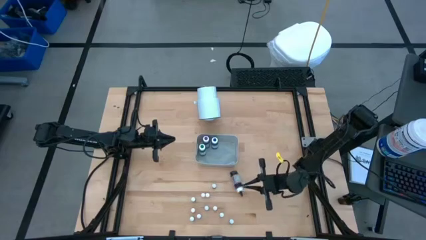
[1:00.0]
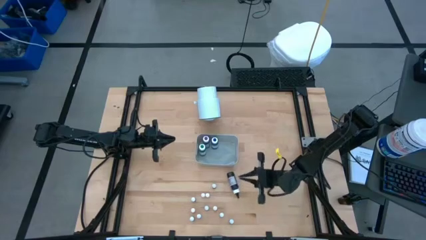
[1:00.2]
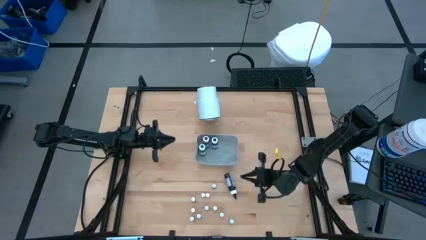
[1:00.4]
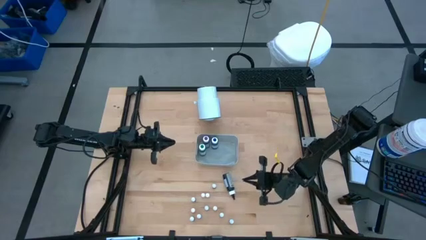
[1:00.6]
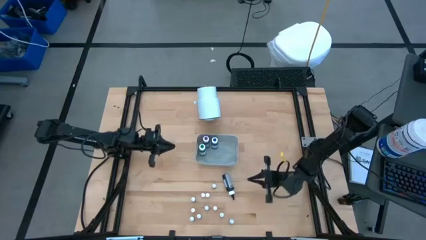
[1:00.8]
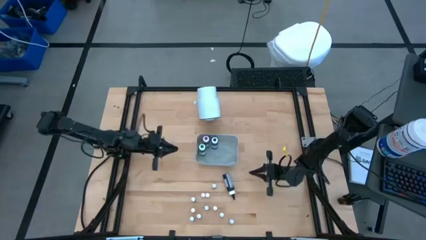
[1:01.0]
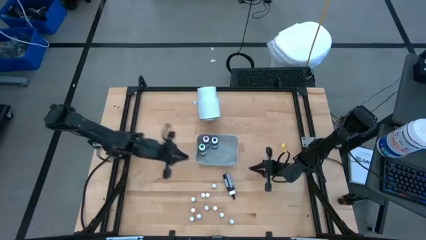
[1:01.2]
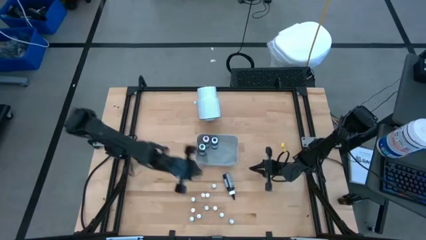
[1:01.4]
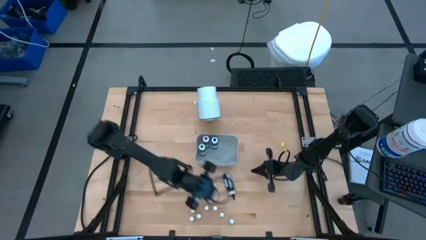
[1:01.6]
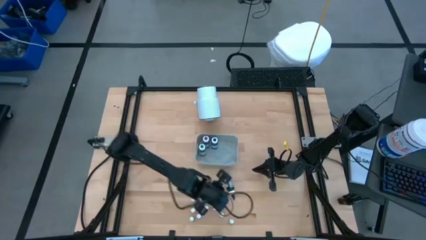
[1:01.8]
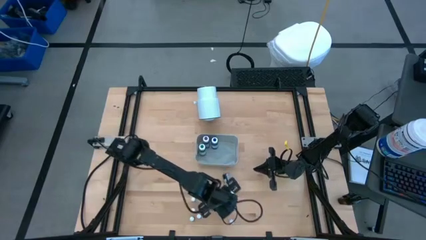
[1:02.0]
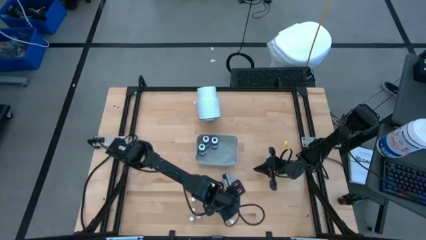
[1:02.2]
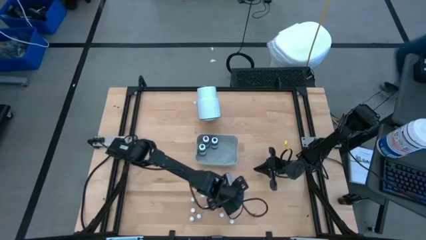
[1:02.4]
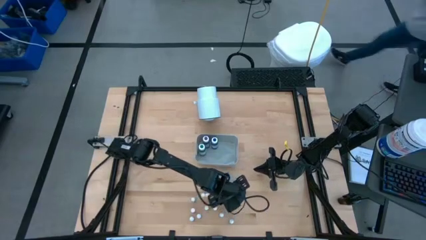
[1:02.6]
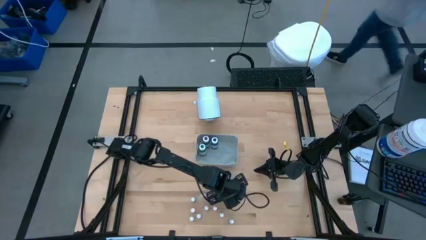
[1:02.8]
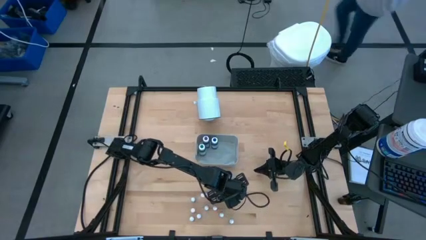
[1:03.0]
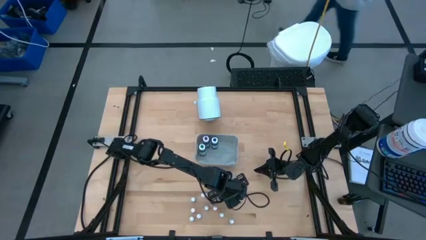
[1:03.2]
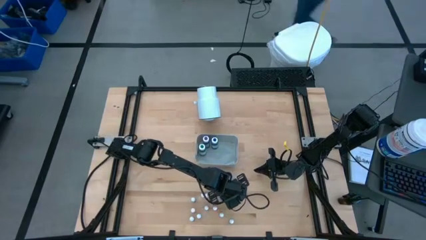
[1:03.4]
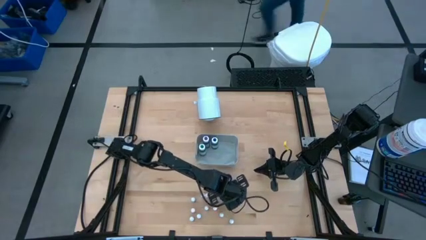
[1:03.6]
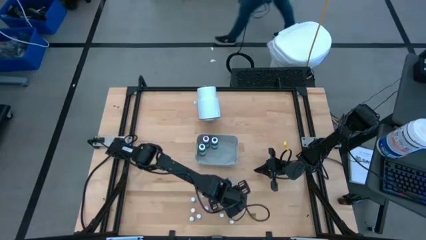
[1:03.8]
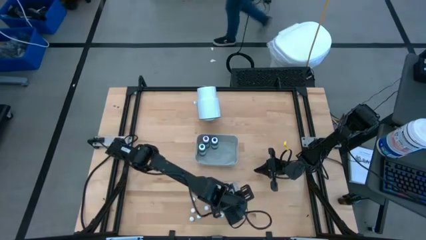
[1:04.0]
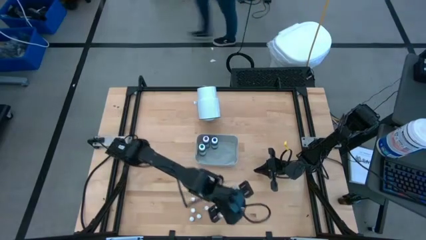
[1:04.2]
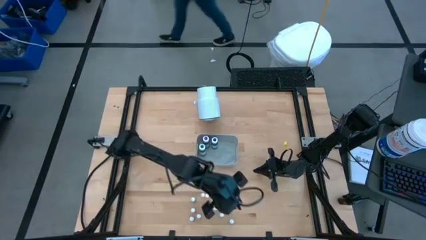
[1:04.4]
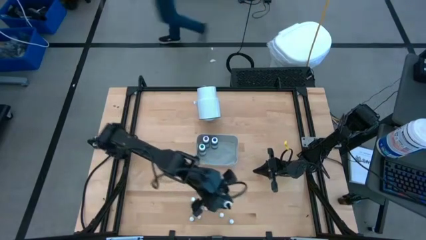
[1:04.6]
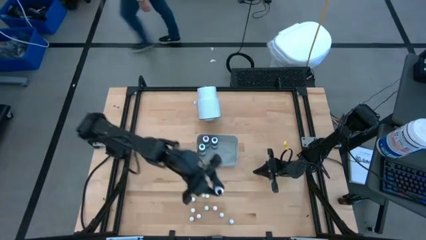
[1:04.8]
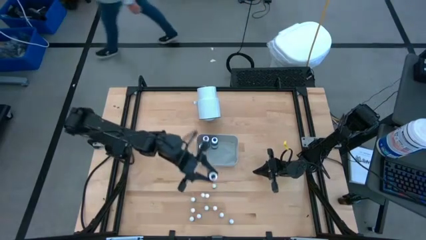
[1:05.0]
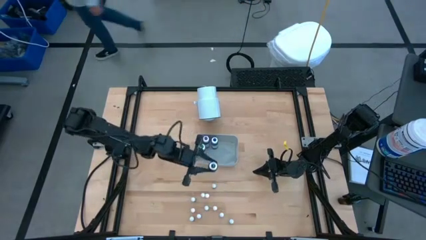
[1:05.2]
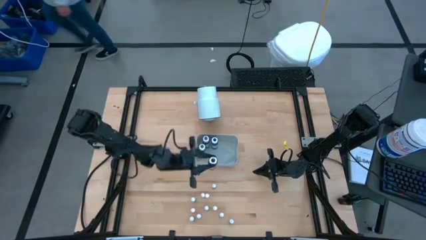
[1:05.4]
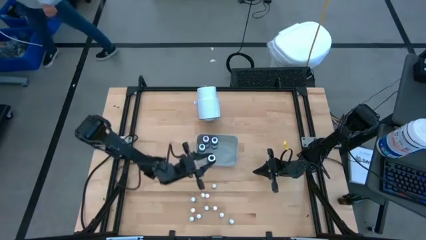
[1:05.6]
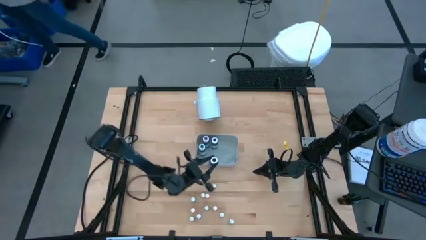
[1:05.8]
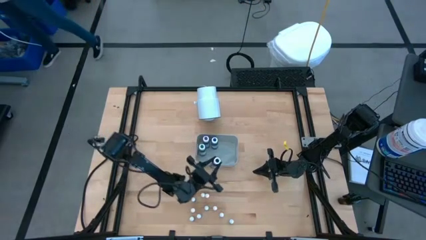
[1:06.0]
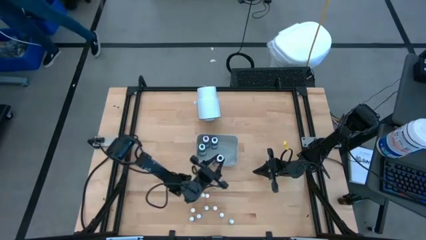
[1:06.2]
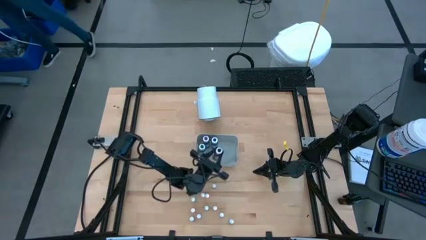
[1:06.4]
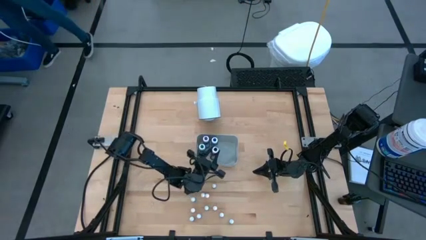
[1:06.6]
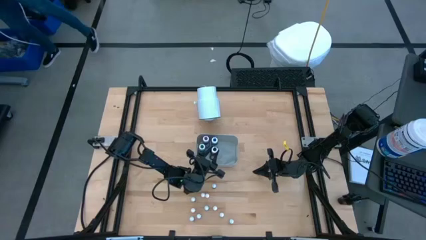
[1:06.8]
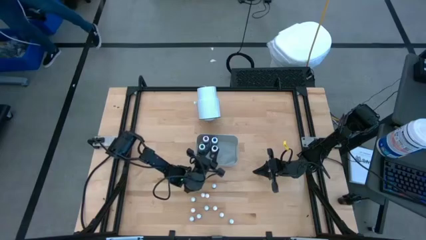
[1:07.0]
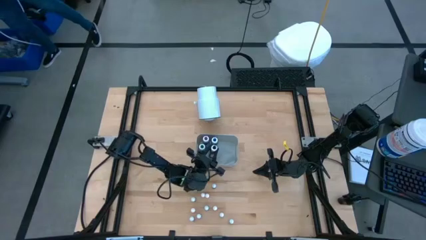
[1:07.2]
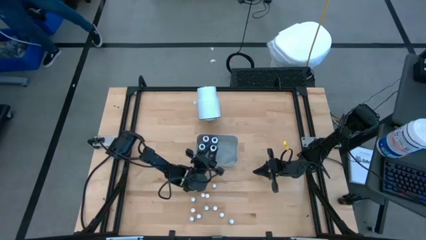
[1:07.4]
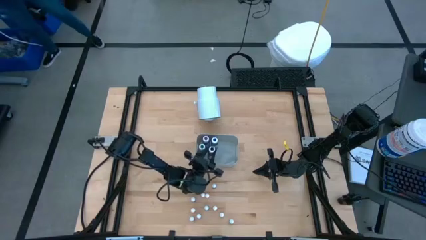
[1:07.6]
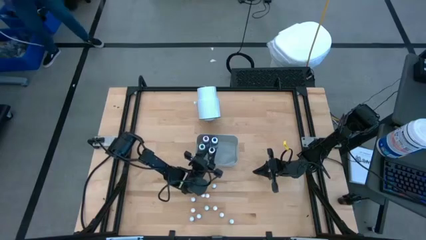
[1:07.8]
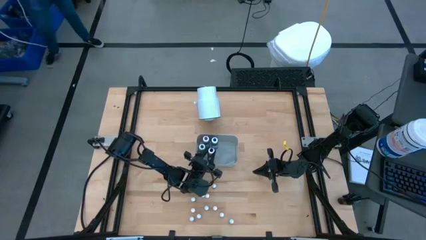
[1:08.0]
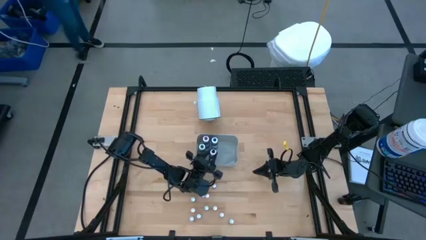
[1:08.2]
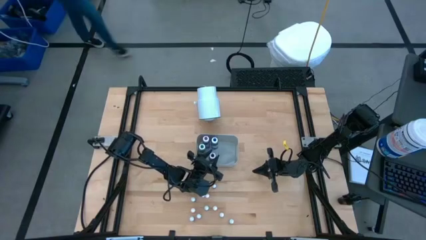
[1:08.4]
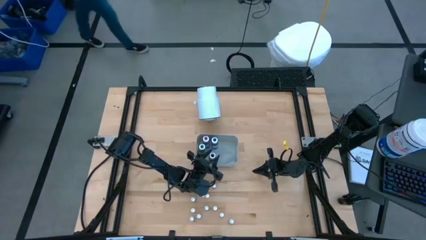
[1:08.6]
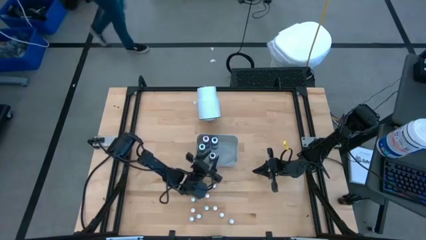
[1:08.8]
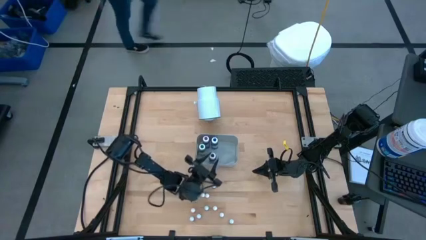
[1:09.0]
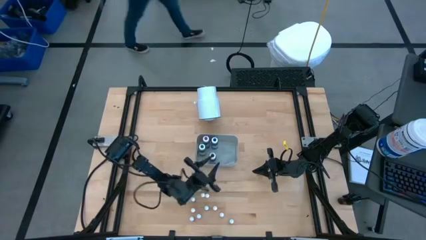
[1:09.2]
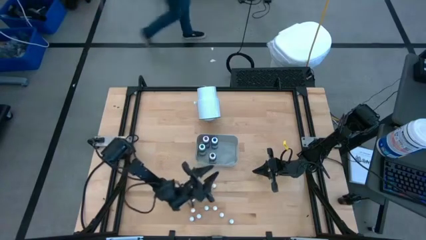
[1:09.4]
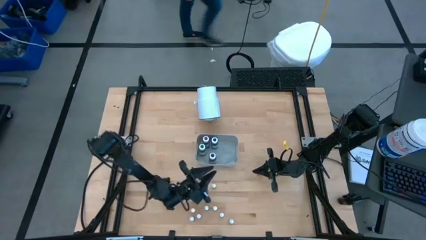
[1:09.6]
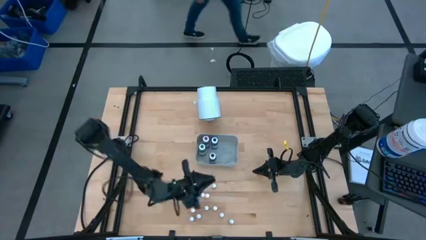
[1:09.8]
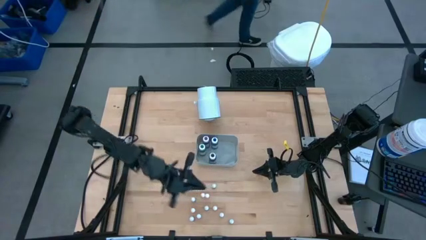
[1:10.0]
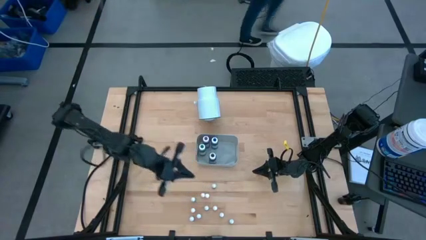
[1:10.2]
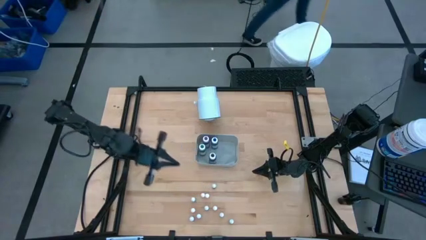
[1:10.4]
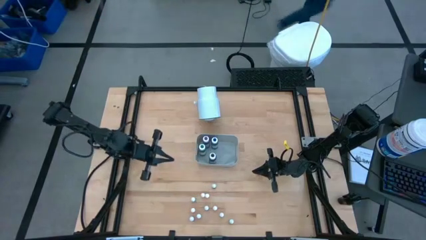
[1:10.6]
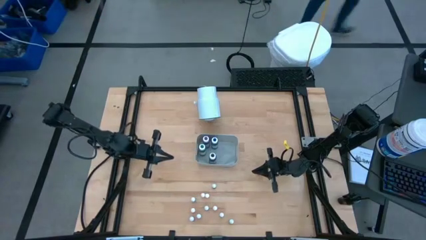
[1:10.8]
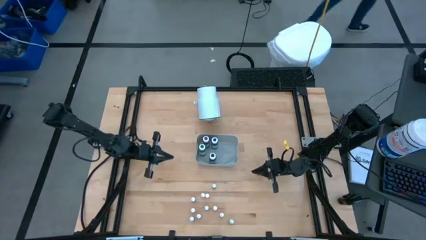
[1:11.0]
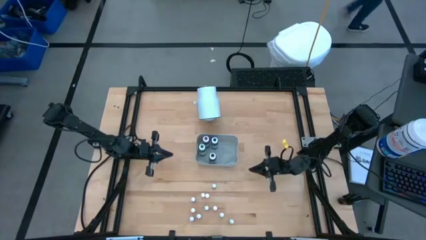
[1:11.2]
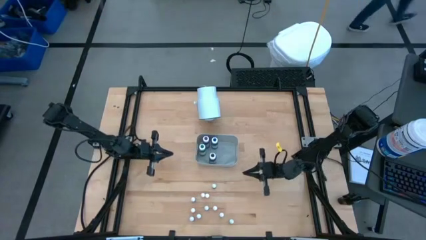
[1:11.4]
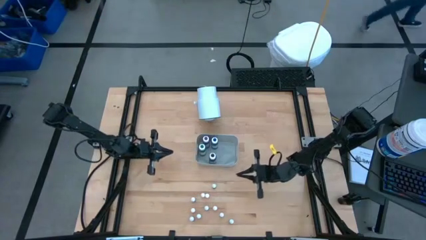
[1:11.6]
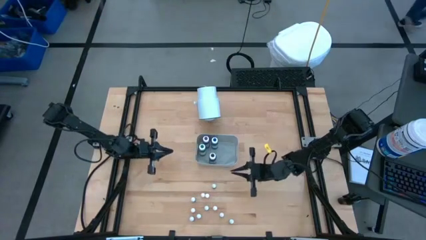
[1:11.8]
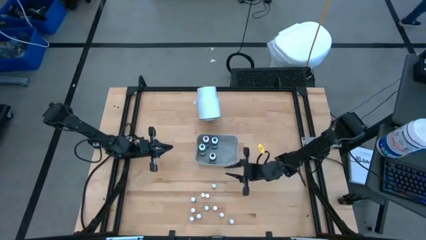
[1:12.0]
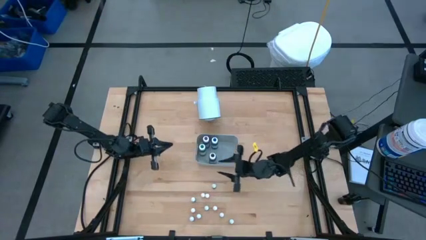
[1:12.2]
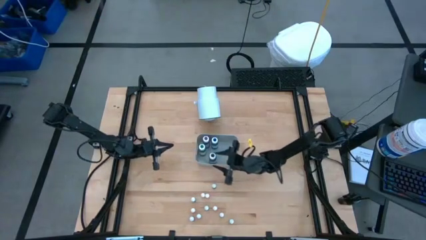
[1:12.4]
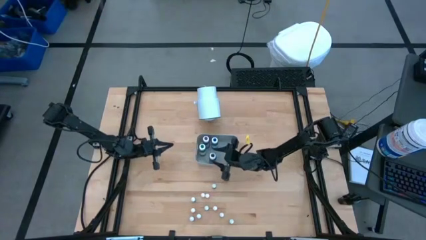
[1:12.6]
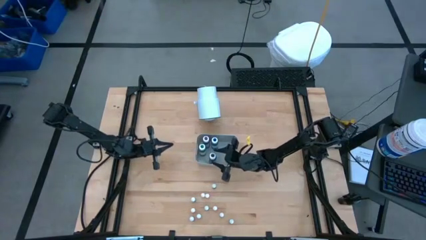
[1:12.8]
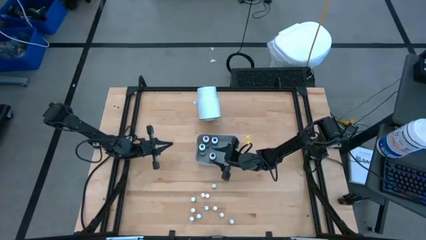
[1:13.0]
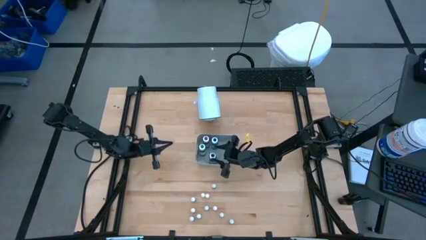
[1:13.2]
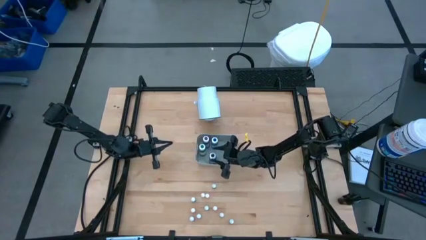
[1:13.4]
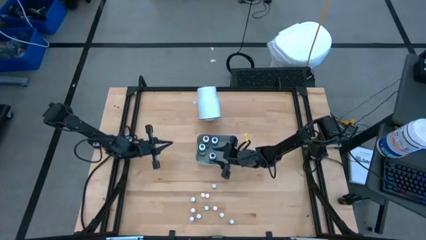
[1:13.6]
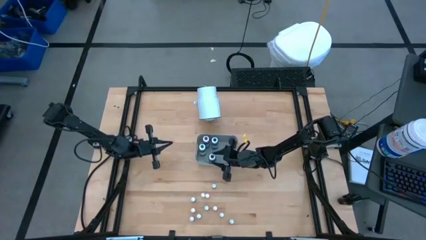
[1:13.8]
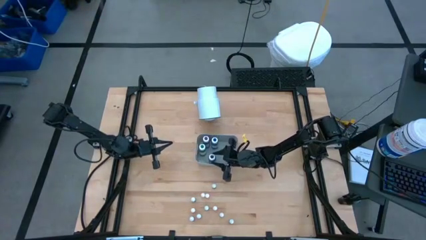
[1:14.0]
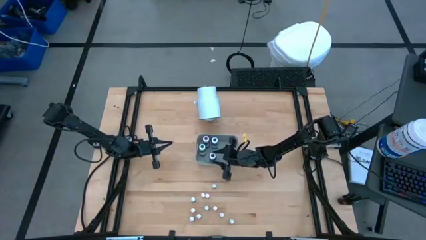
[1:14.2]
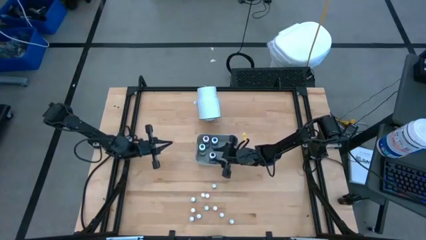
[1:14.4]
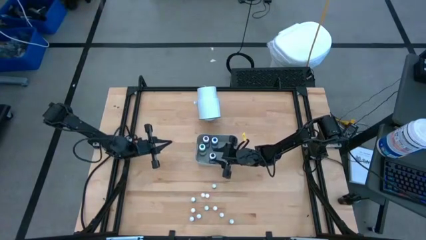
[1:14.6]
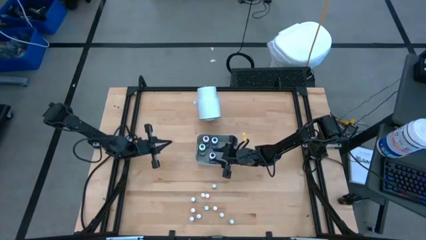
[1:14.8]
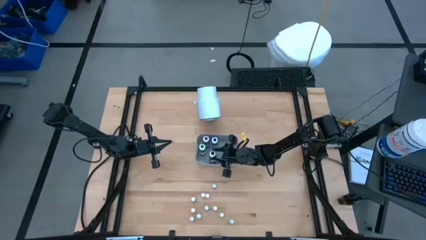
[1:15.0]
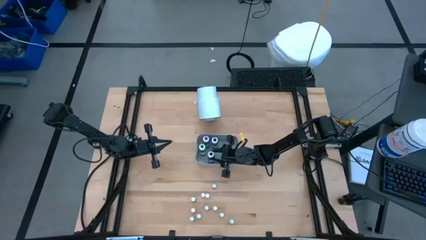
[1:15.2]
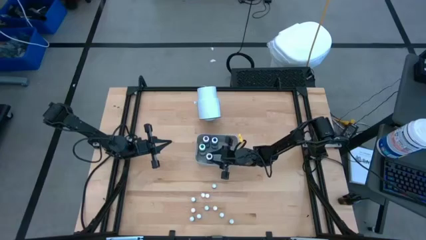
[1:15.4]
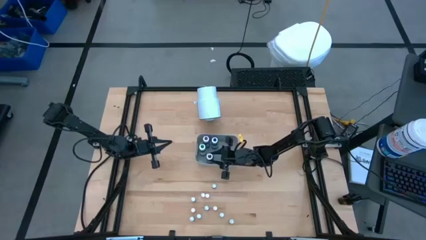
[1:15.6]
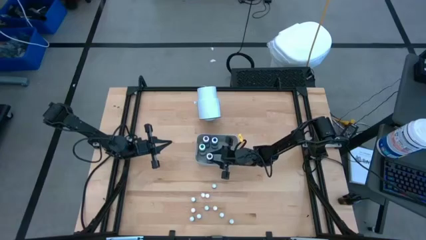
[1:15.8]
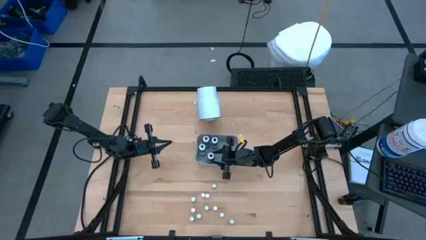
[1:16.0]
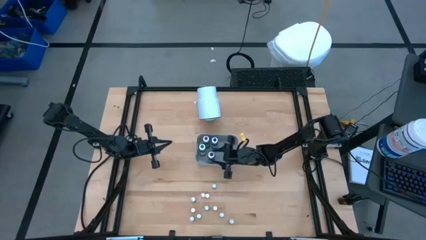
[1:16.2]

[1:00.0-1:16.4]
Task: Pick & Place food coloring
Put the black food coloring bottle into the gray bin
